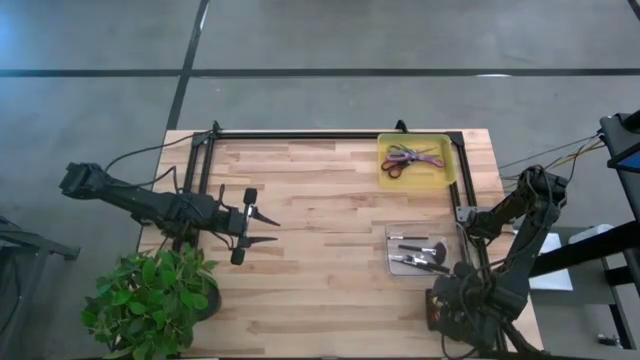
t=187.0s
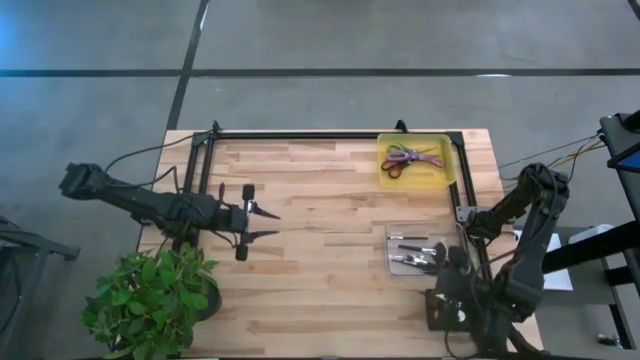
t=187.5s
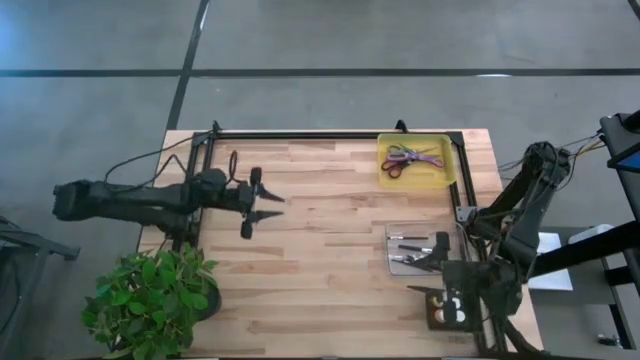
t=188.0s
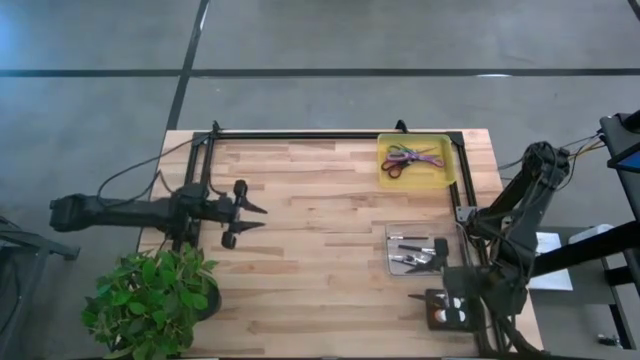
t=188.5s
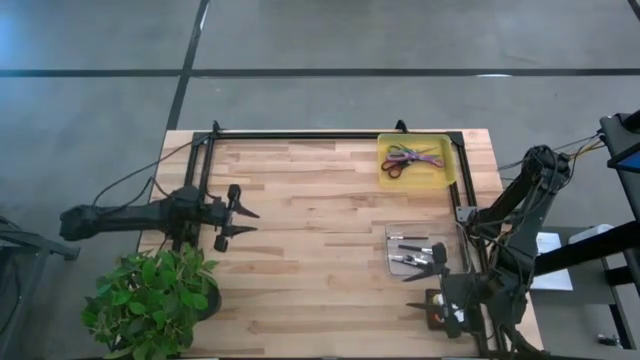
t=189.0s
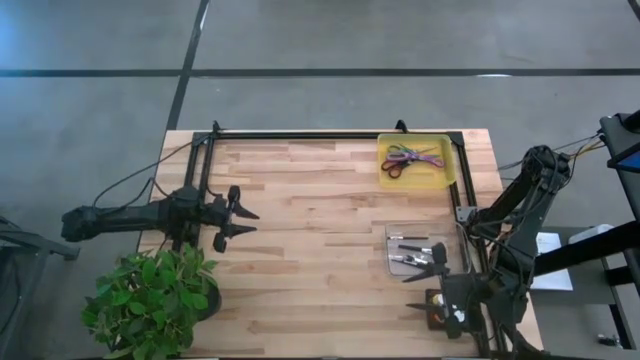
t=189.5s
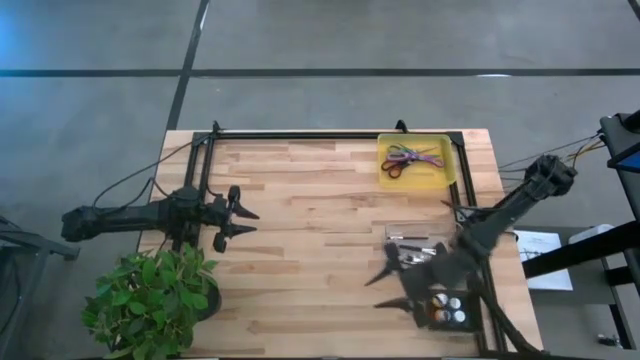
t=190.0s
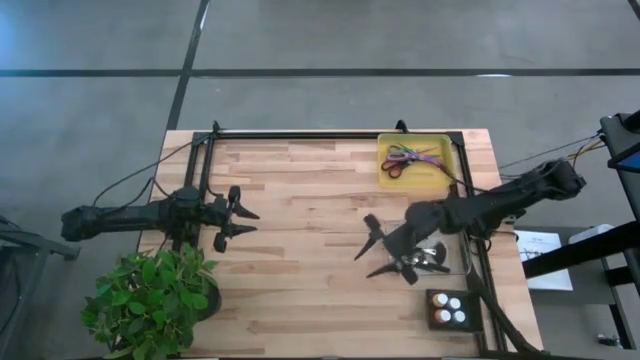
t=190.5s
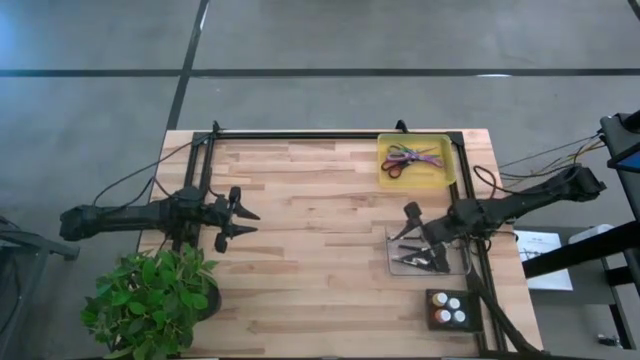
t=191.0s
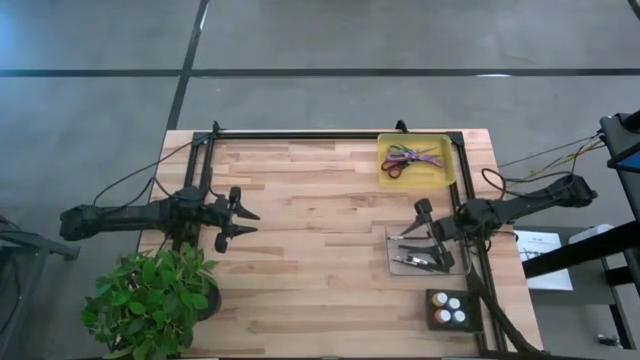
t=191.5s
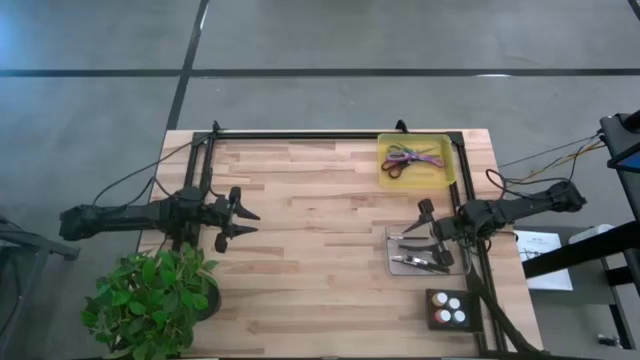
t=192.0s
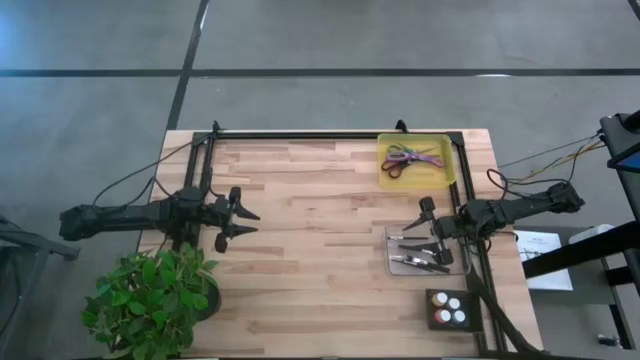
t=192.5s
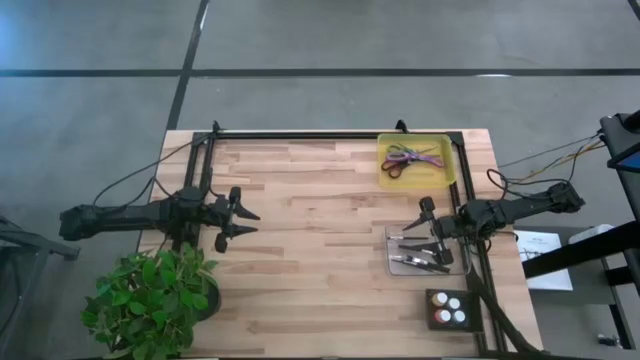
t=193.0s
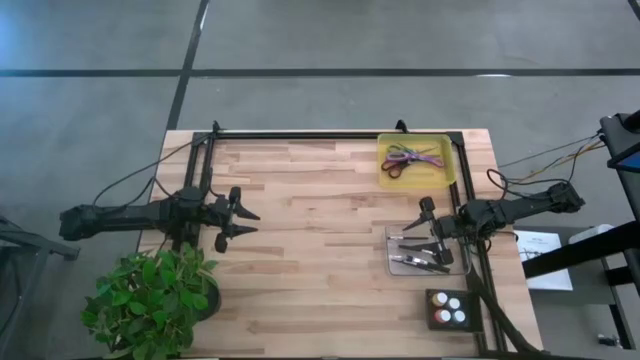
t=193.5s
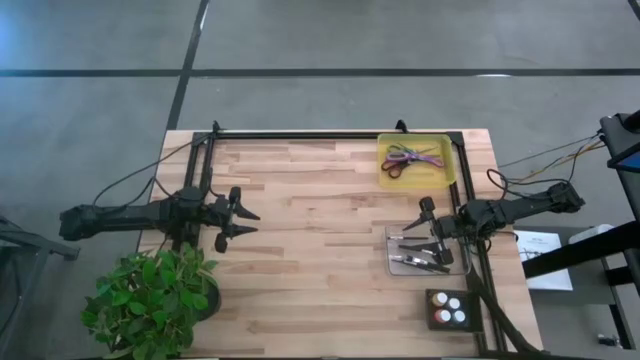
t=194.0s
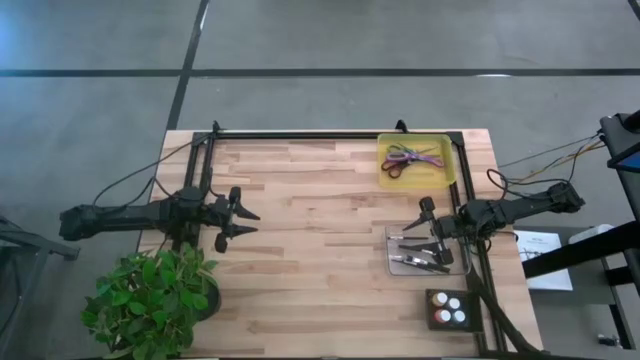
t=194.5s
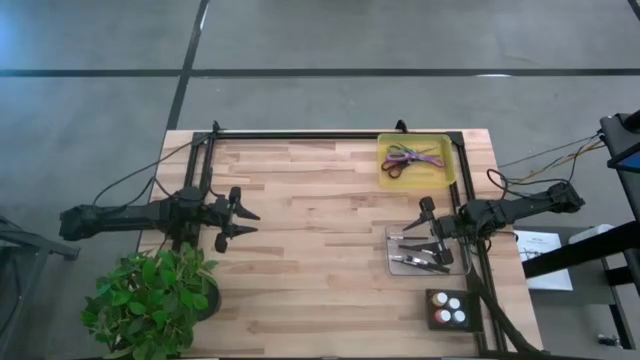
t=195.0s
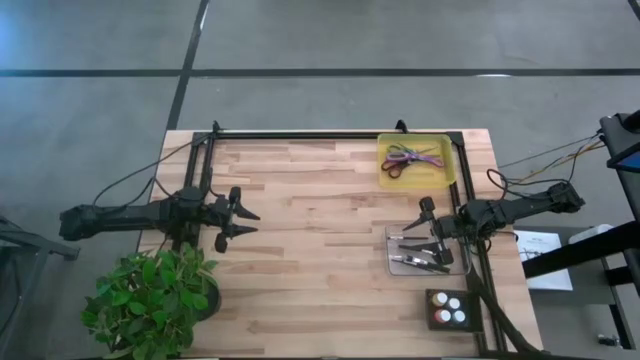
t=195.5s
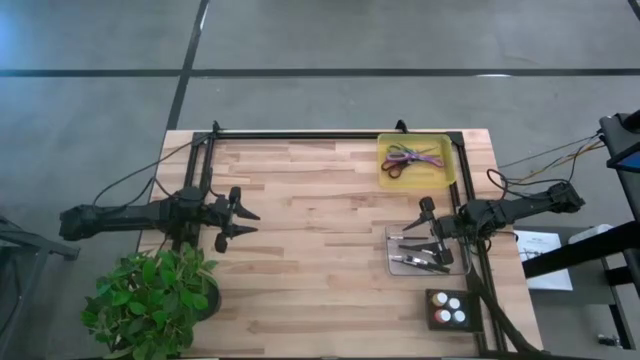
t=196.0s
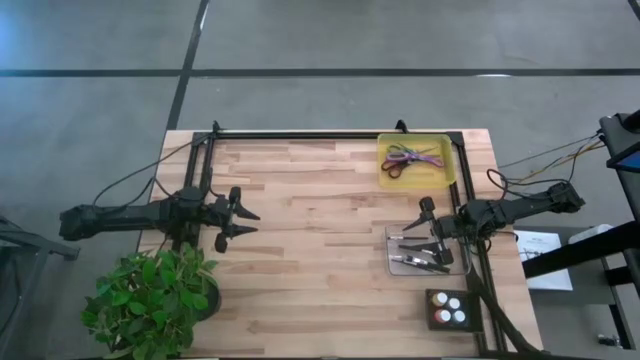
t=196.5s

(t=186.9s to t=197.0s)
Task: Pick & Place Paint Supplies
Return to Home Position

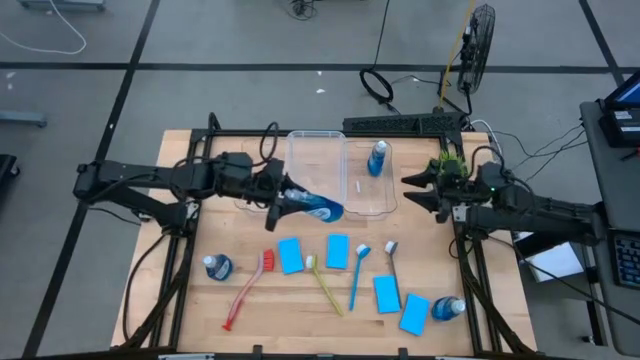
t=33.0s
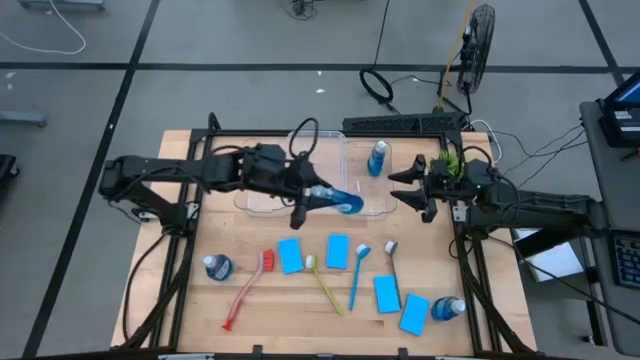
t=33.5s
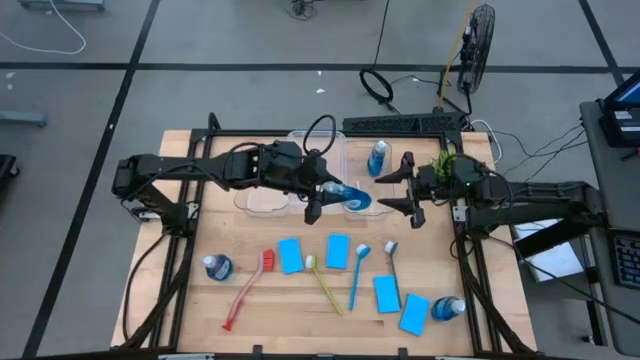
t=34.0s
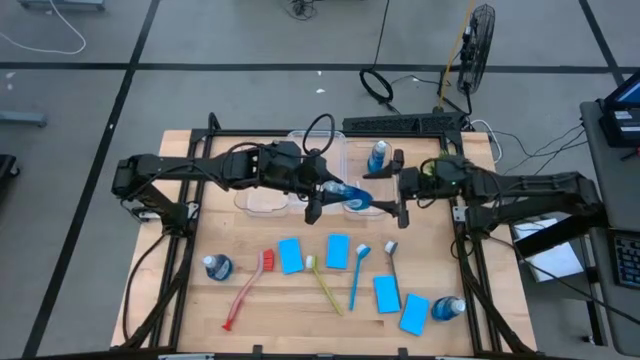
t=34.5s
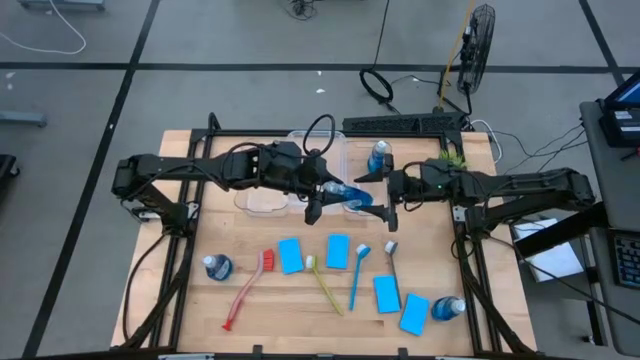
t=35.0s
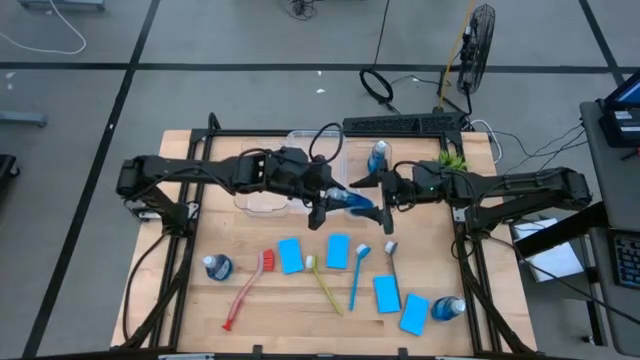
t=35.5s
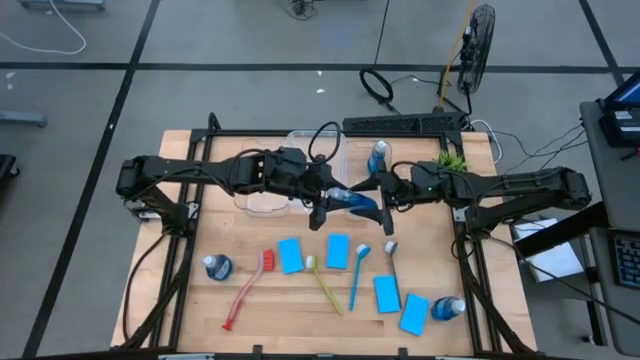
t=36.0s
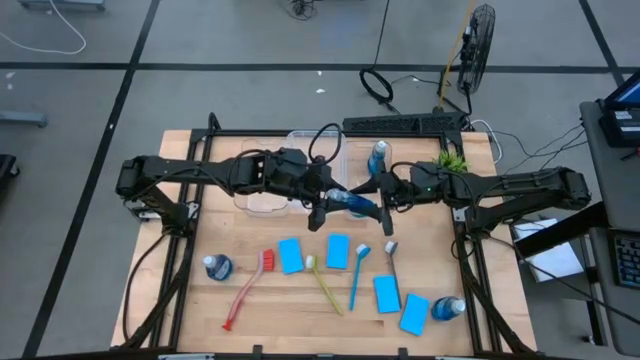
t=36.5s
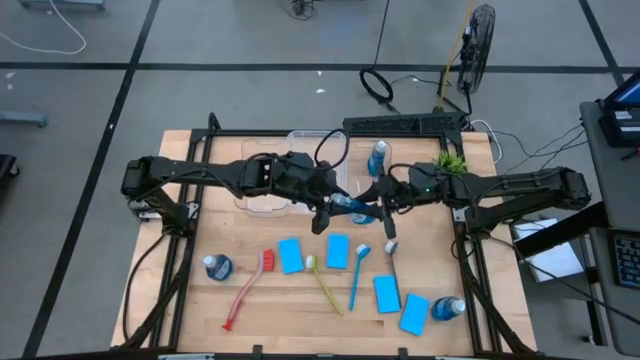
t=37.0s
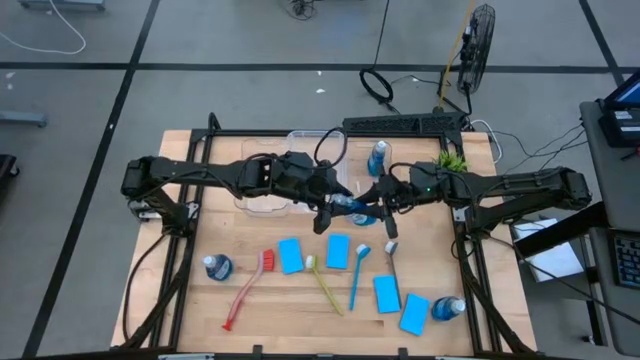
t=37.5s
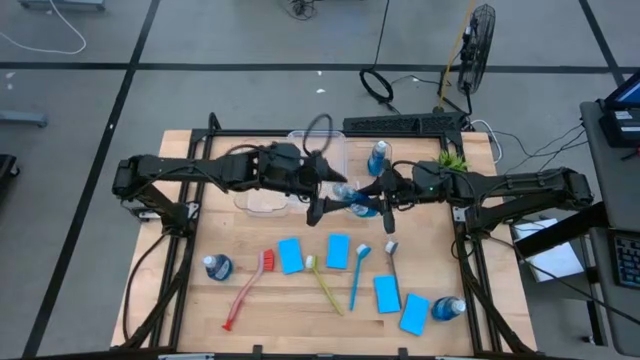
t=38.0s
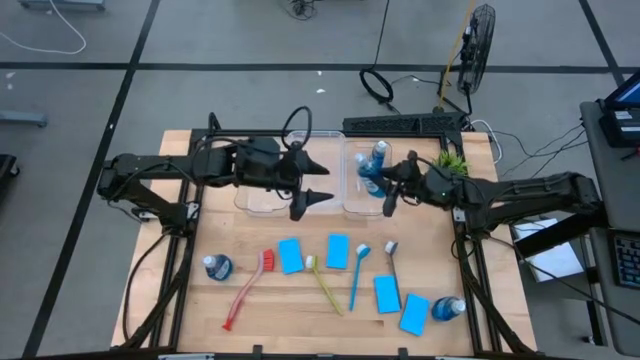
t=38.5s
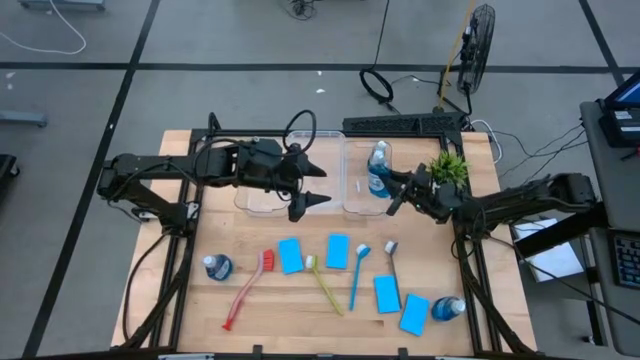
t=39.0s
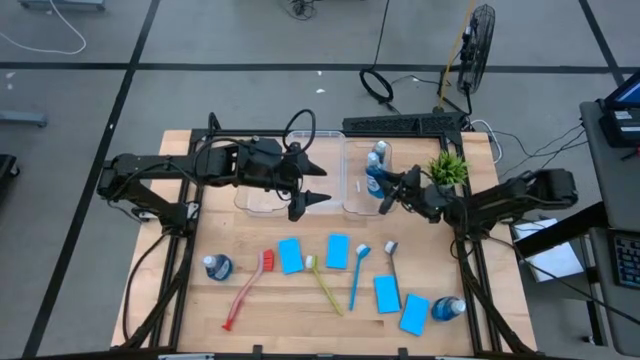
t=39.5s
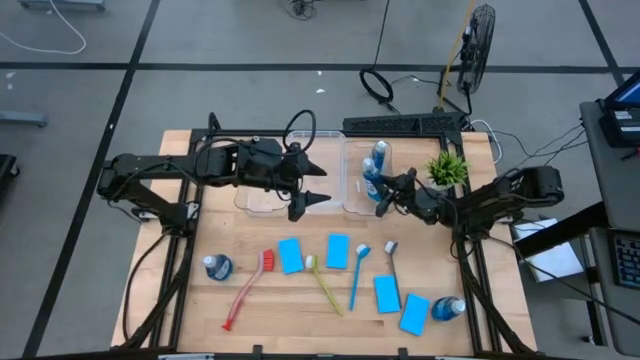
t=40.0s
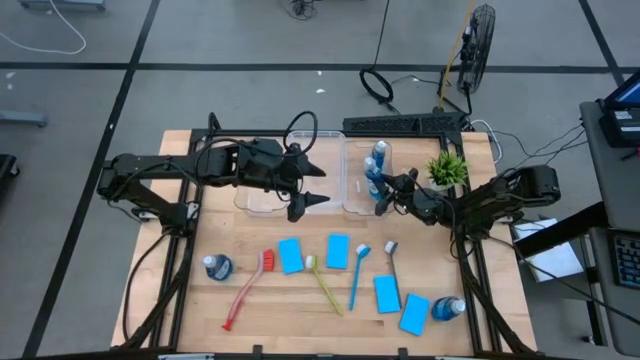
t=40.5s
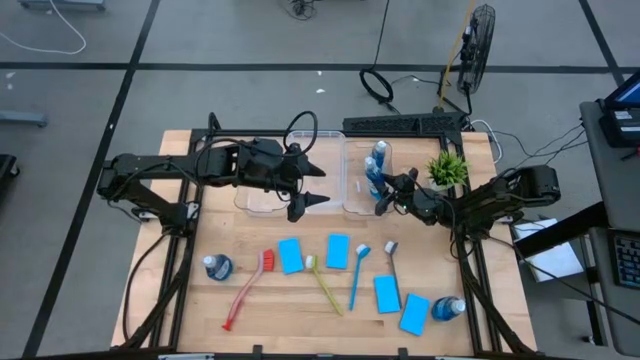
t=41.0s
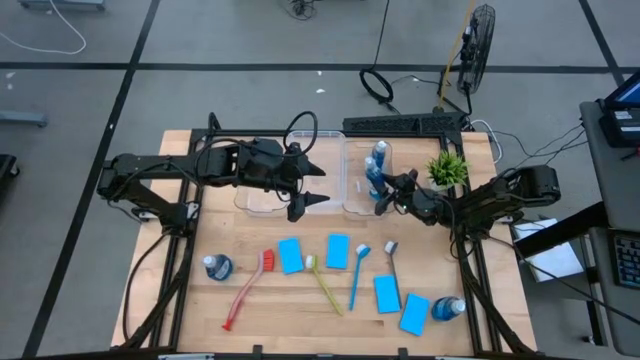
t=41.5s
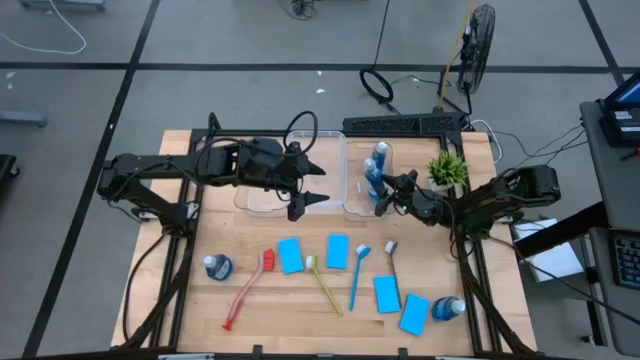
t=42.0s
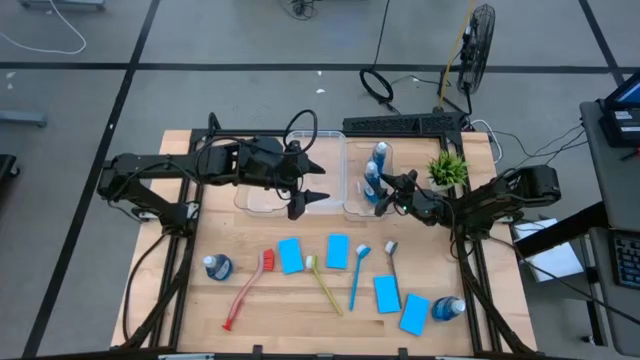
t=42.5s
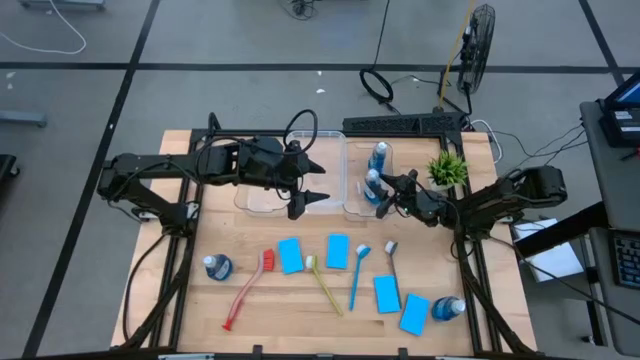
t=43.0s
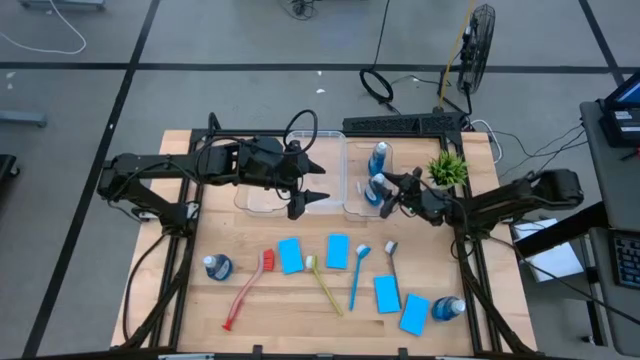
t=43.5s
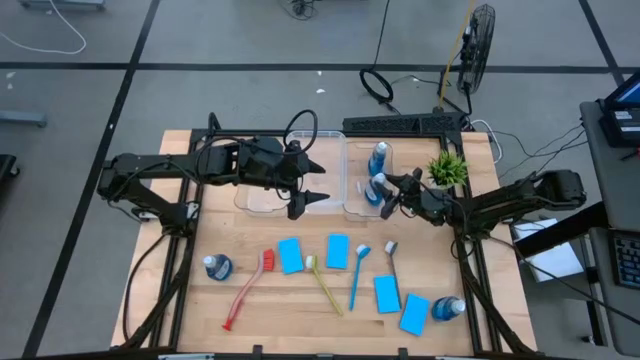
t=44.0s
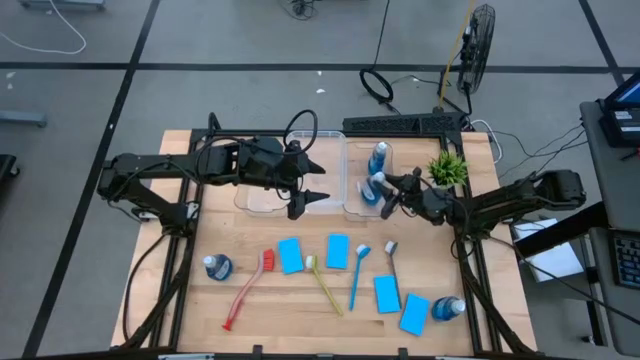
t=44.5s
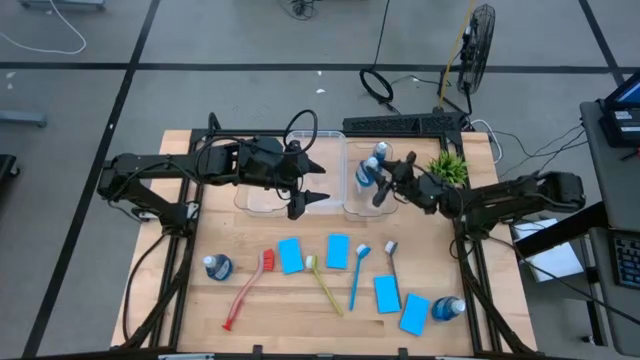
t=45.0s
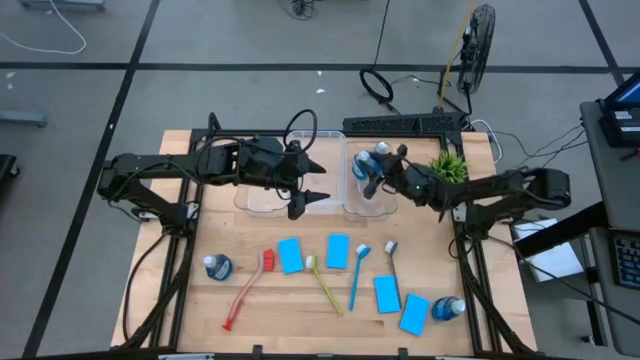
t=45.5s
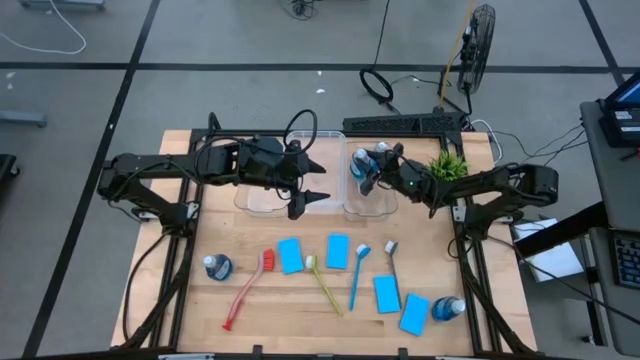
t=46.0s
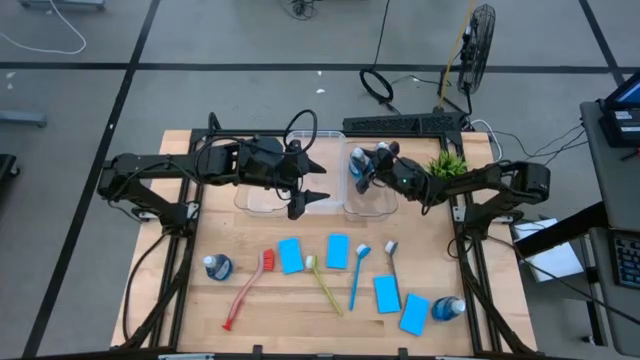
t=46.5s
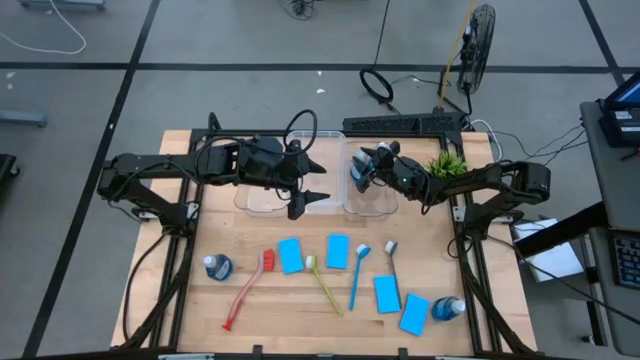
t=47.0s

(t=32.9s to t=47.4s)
Task: Pick & Place Kitchen Sink Supplies
Put the blue dishwashing liquid into the right transparent bin
